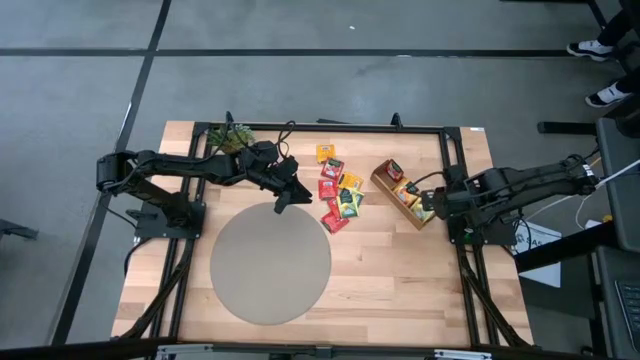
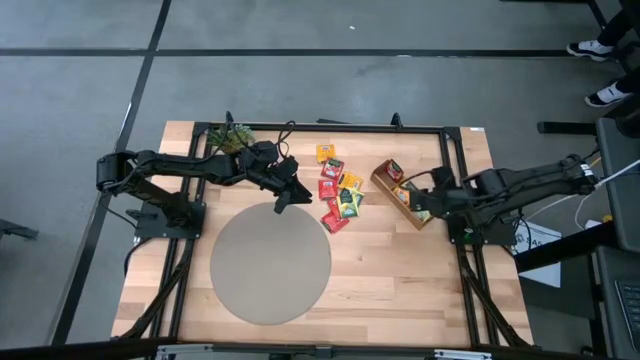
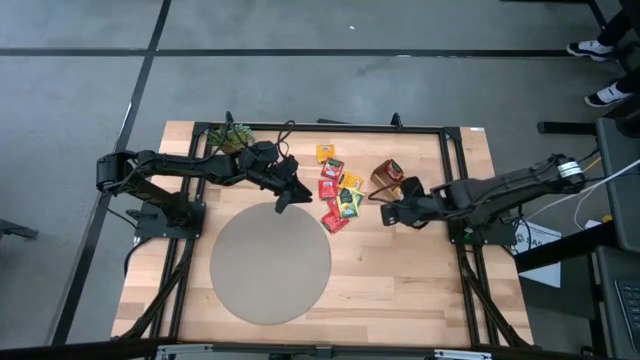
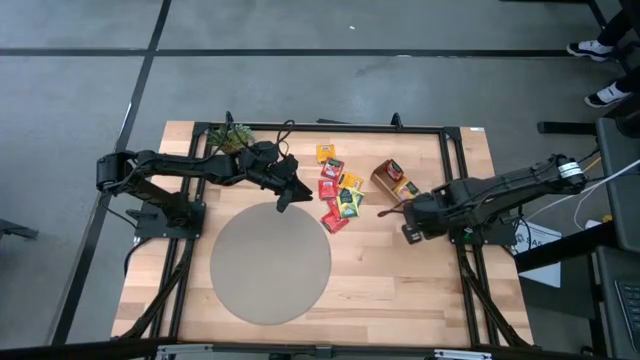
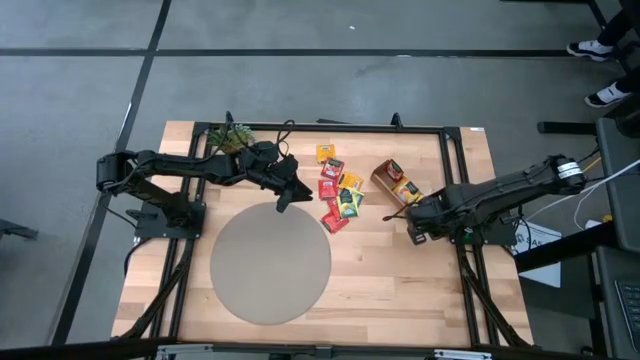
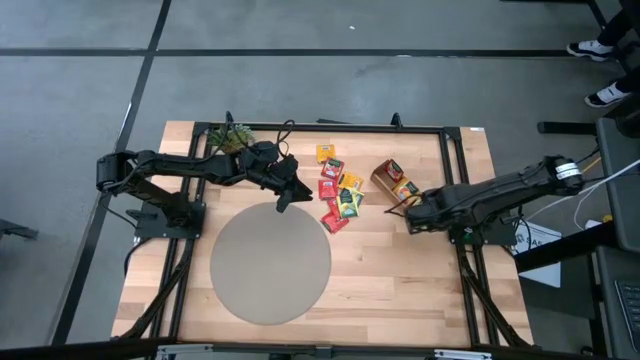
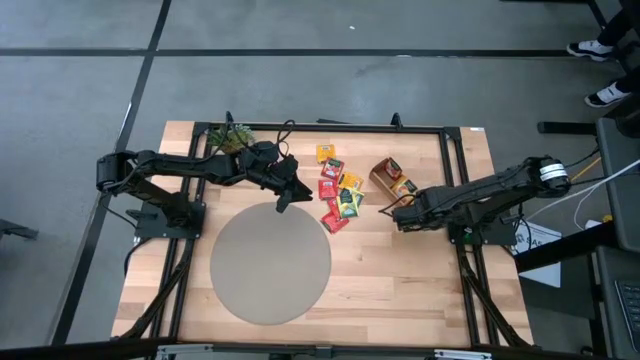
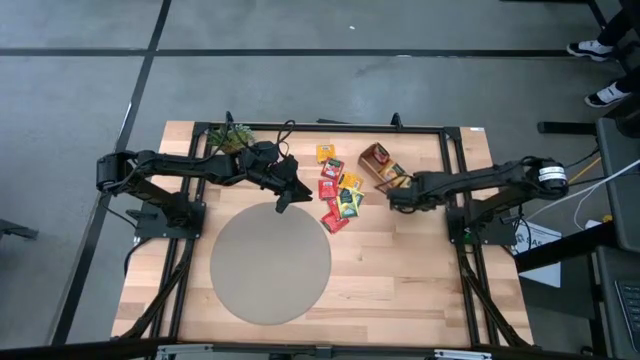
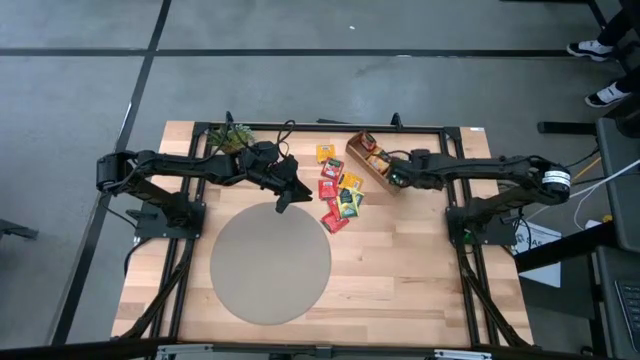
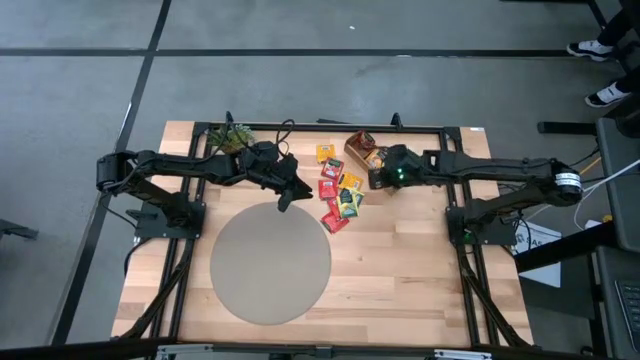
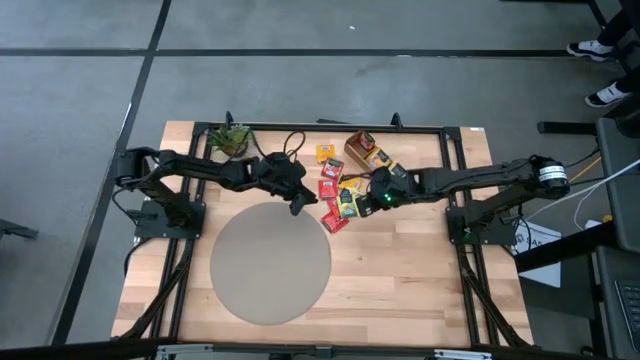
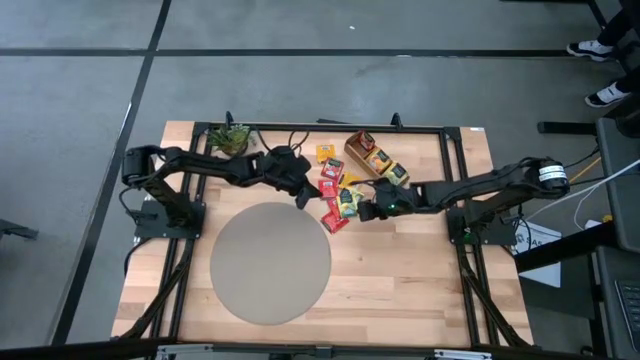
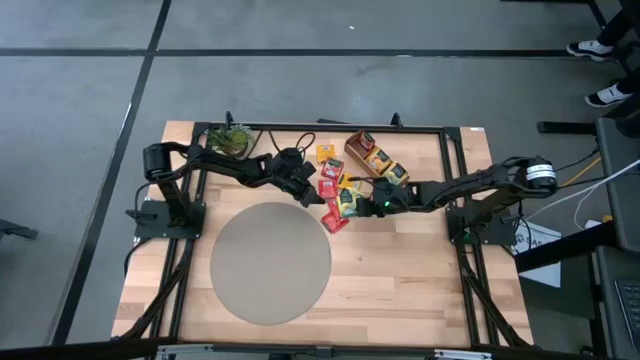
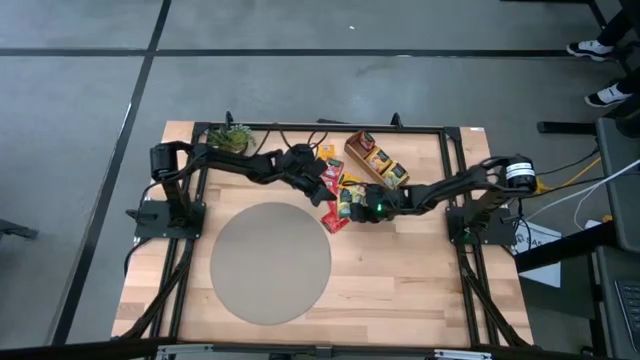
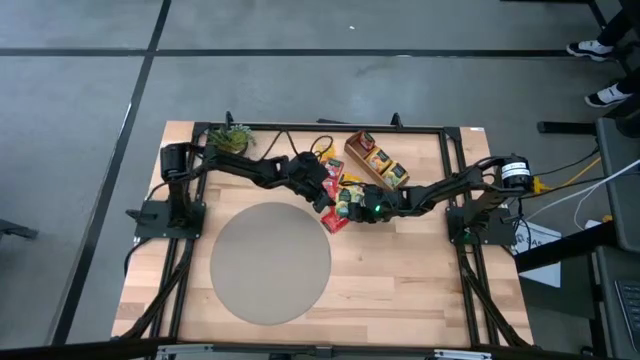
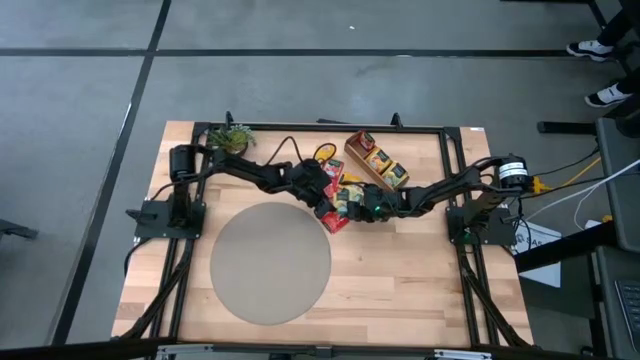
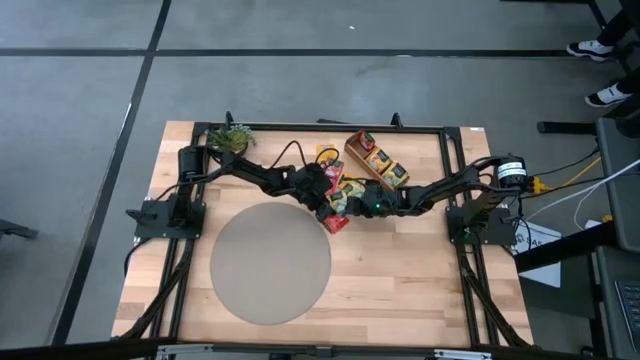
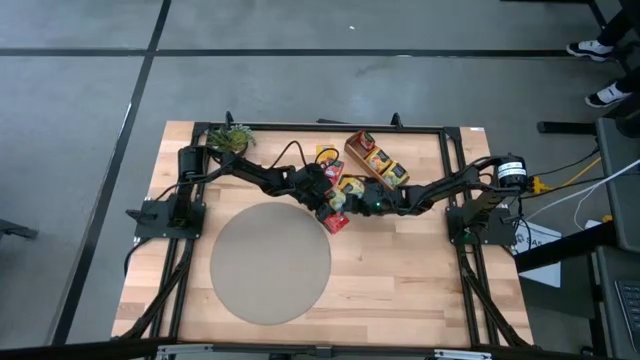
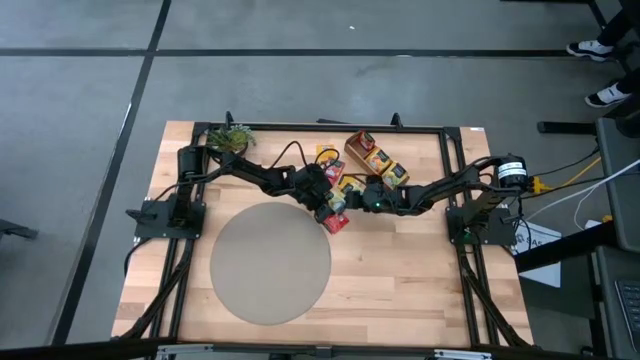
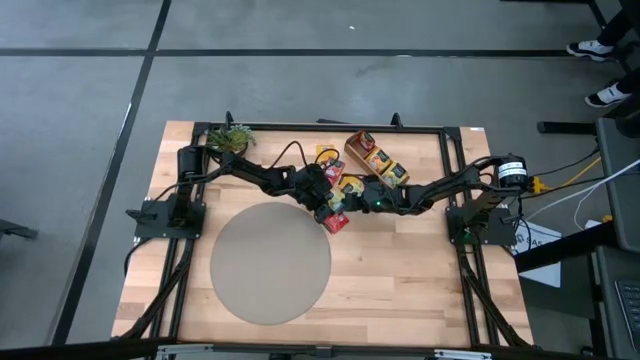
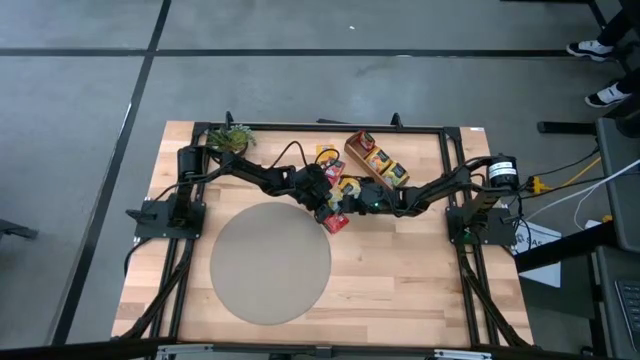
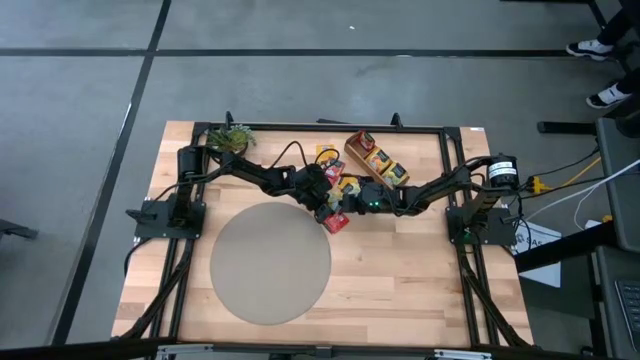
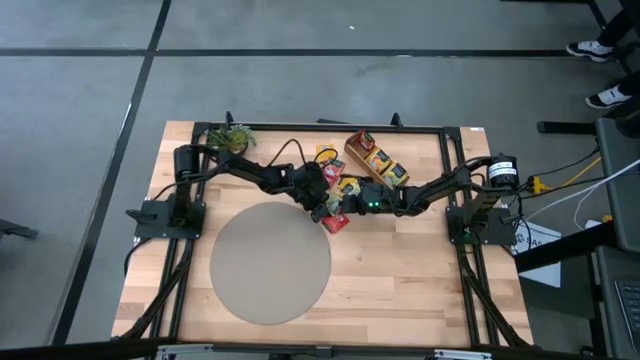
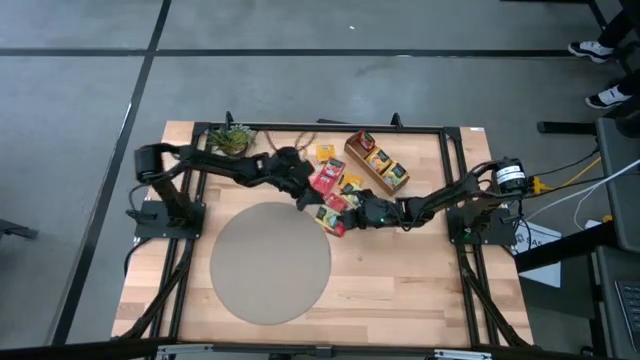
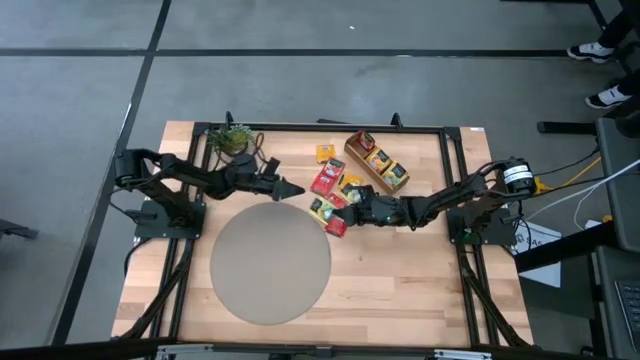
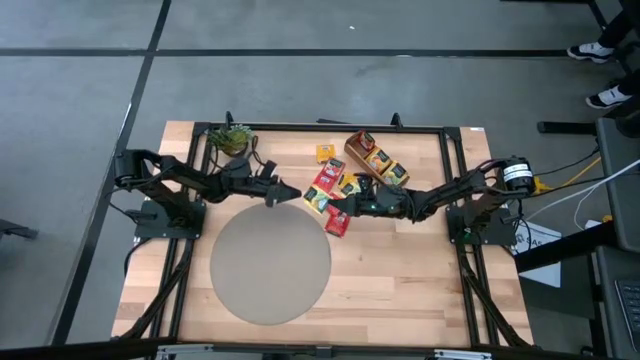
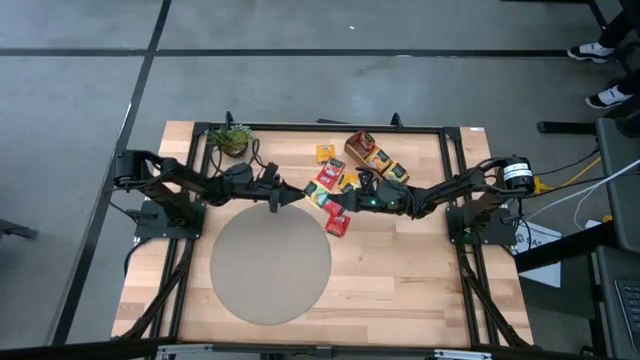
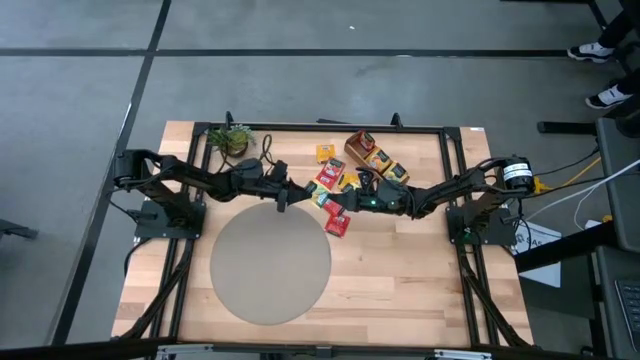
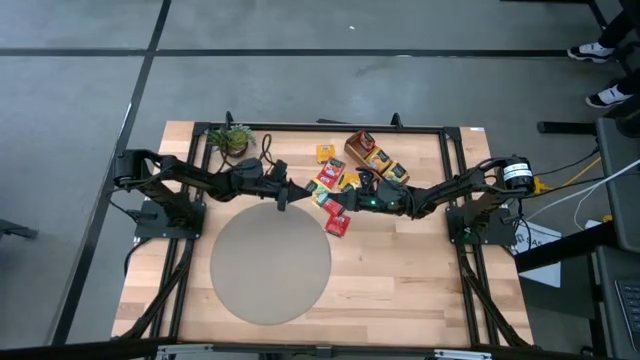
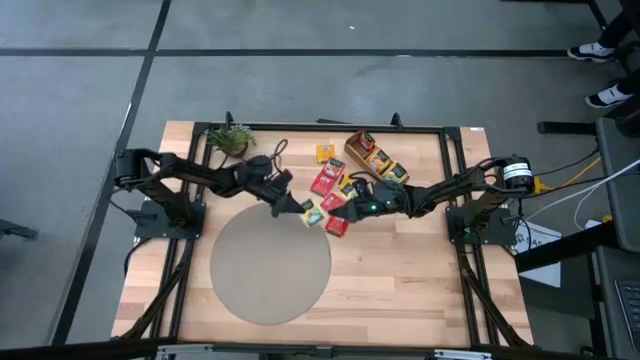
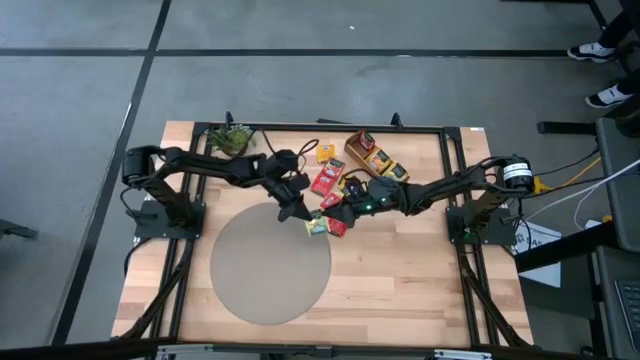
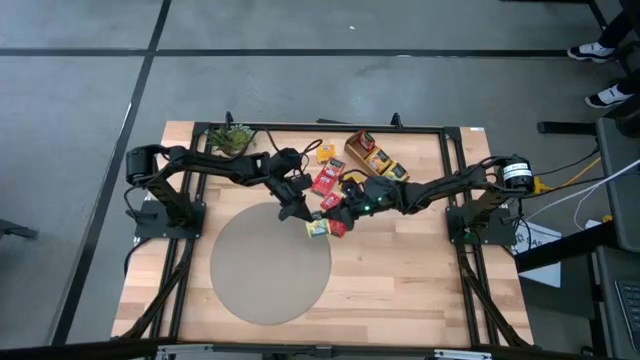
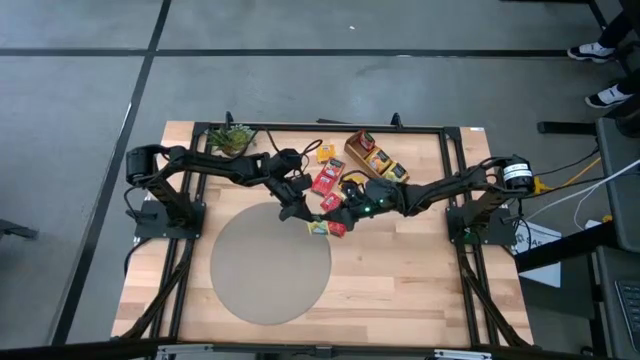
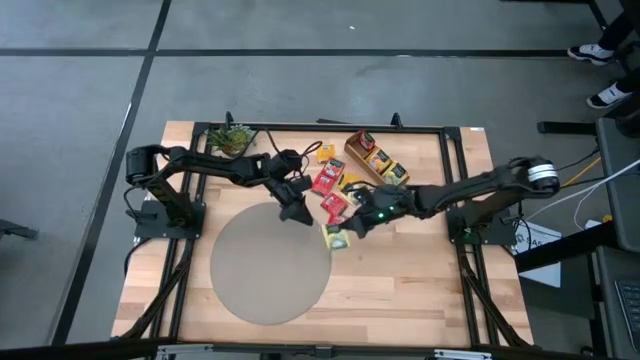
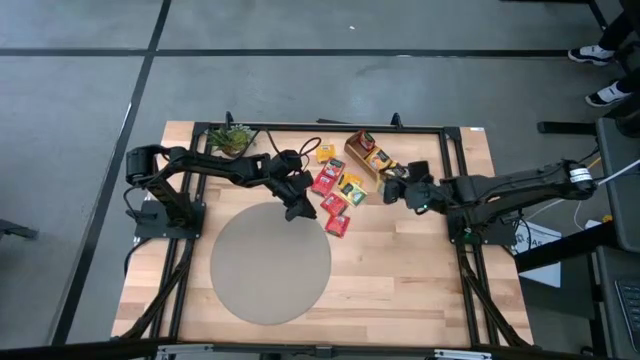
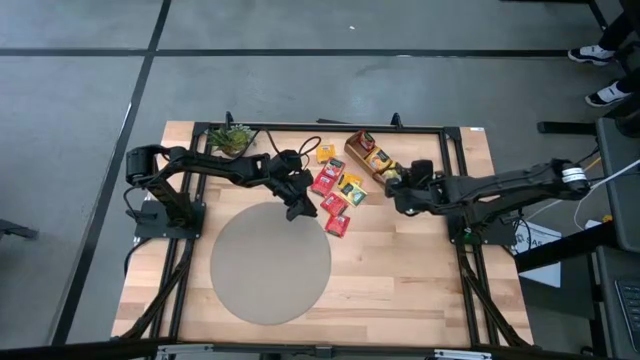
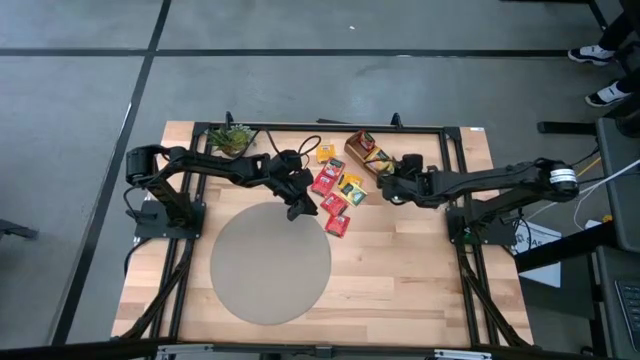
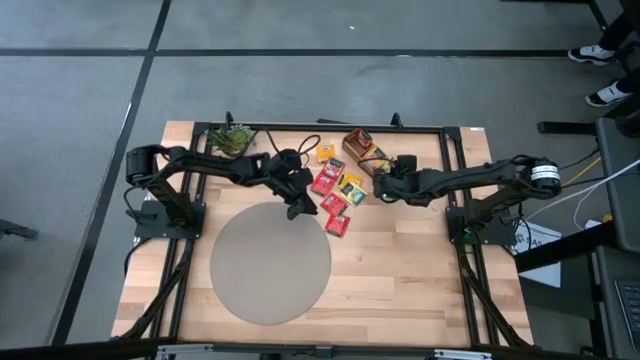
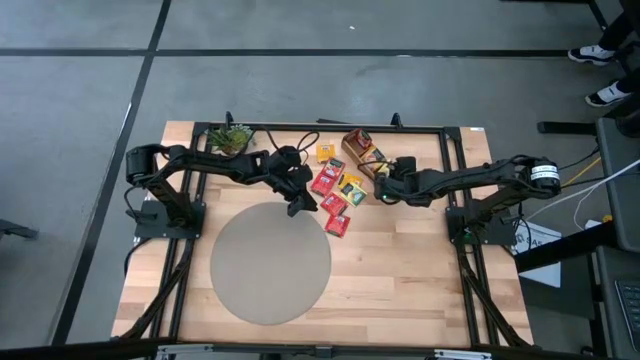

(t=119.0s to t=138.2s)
Task: Pick & Place Tea
Put the yellow tea bag into the bottom section of the wooden organizer

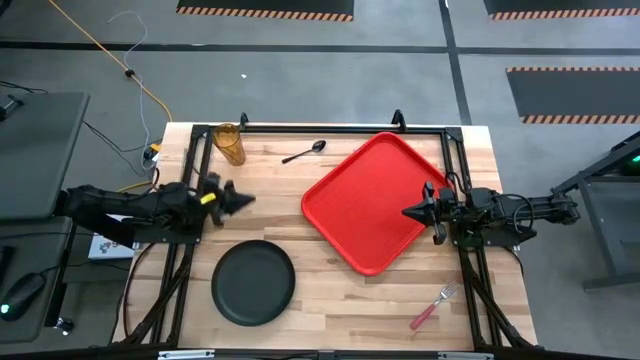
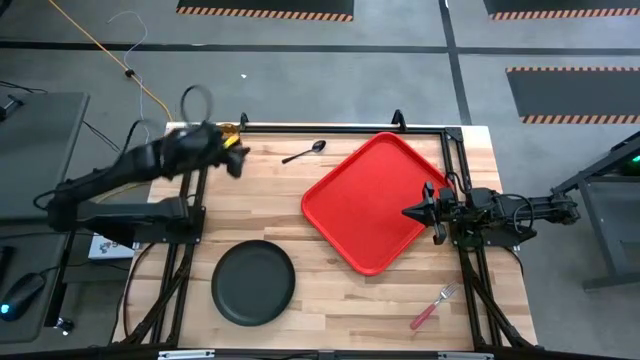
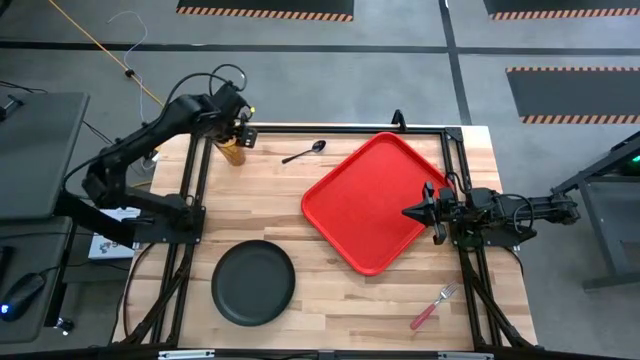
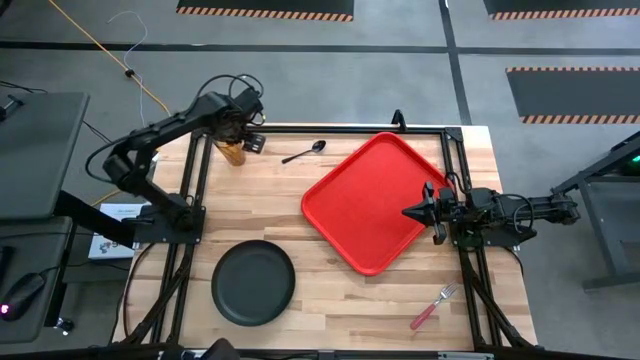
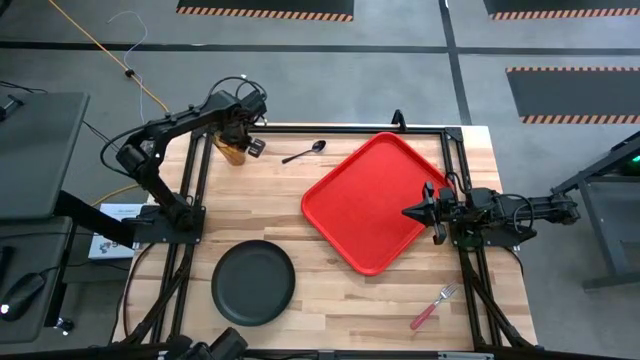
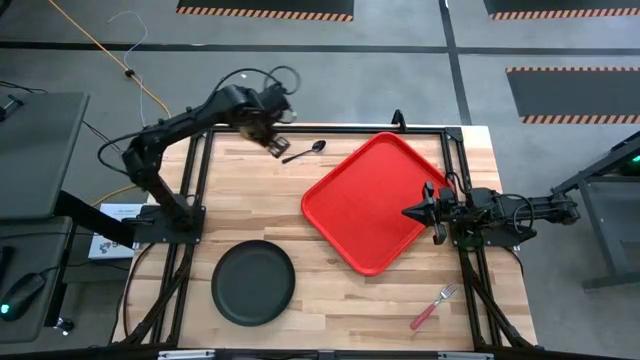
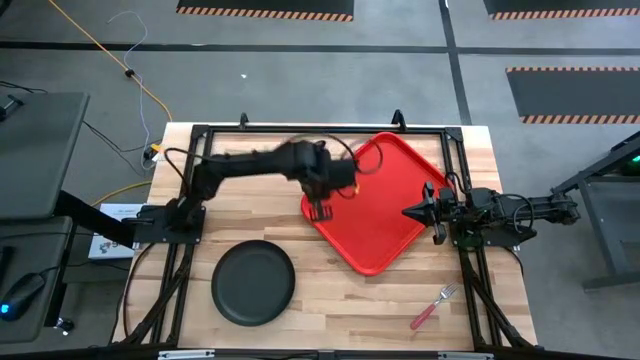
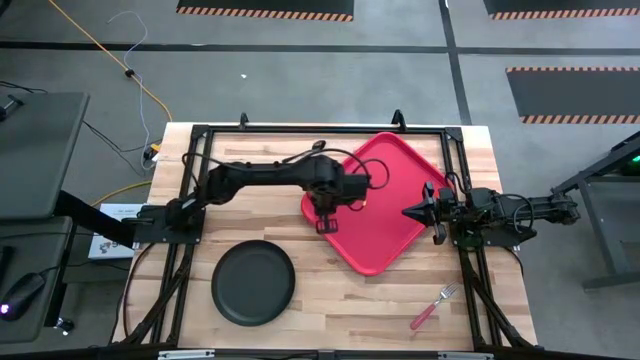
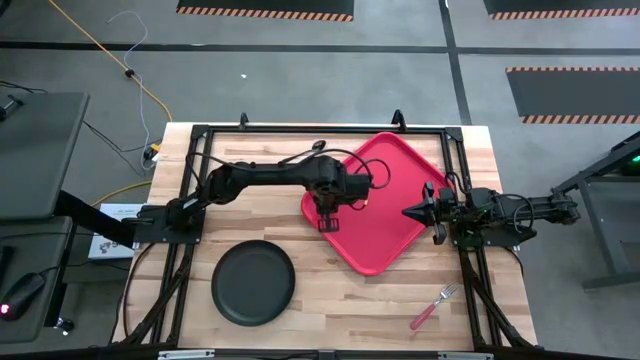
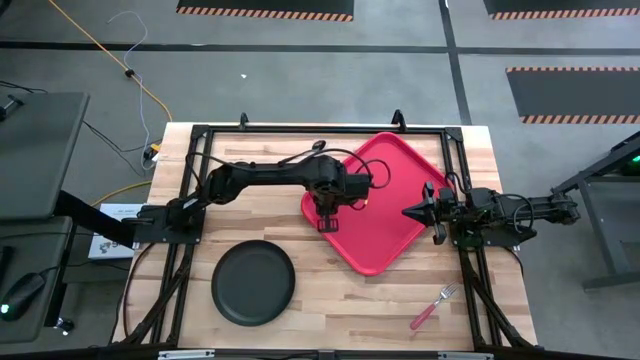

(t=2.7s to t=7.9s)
Task: Pick and place plate/cup/fork/spoon on tray
Put the brown cup on the red serving tray
